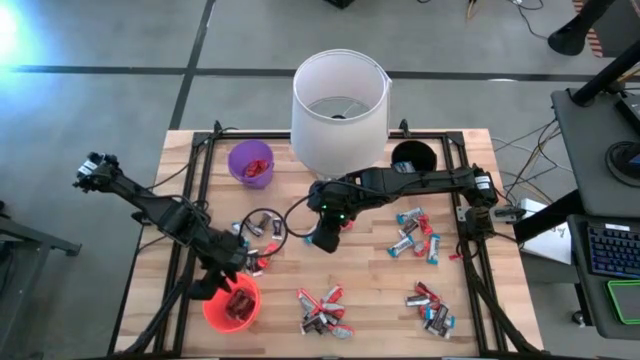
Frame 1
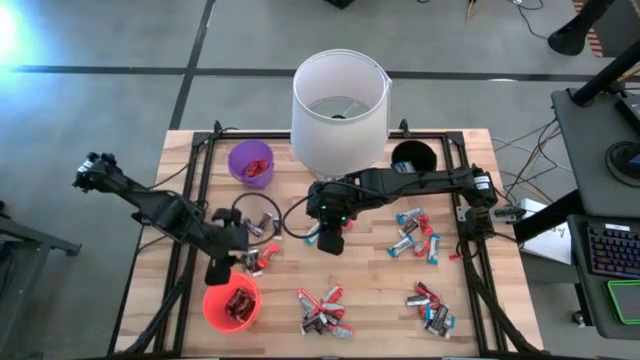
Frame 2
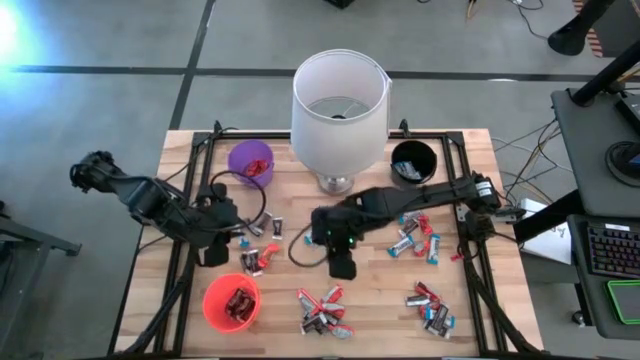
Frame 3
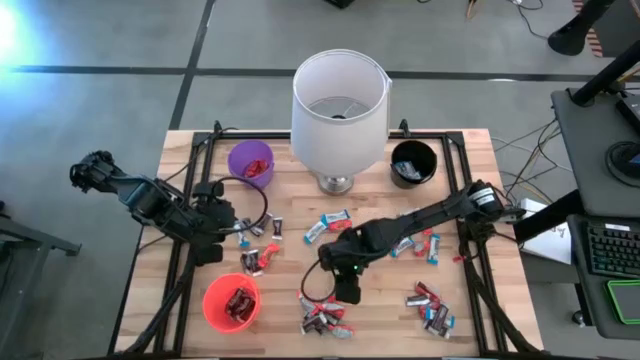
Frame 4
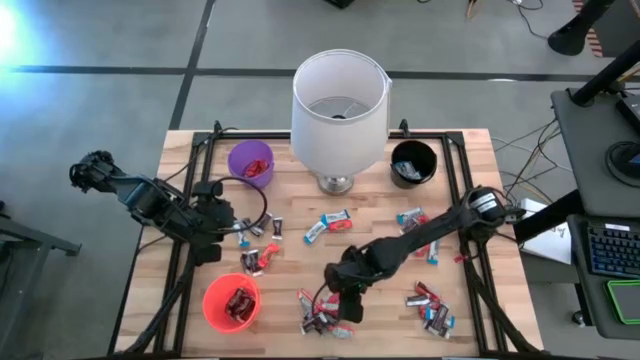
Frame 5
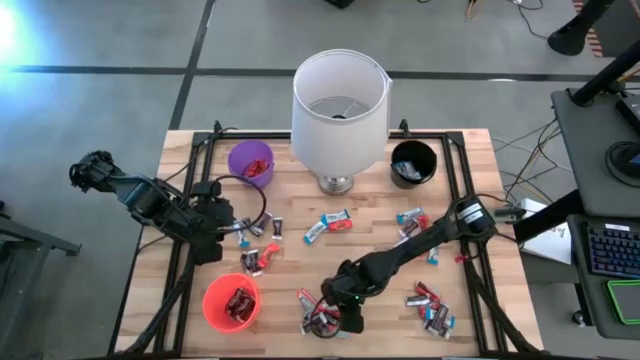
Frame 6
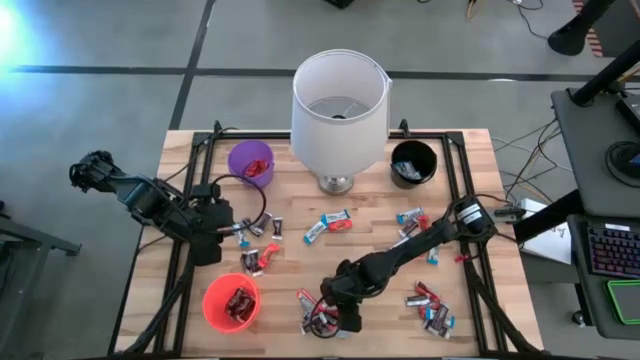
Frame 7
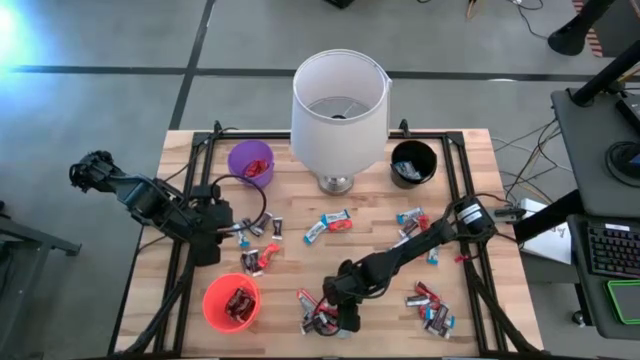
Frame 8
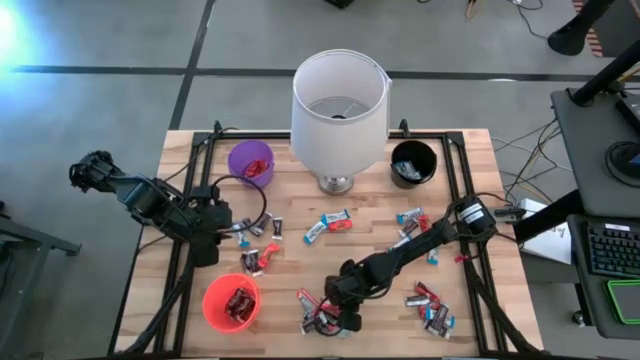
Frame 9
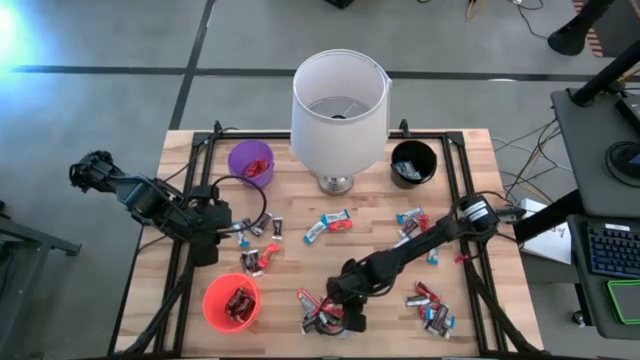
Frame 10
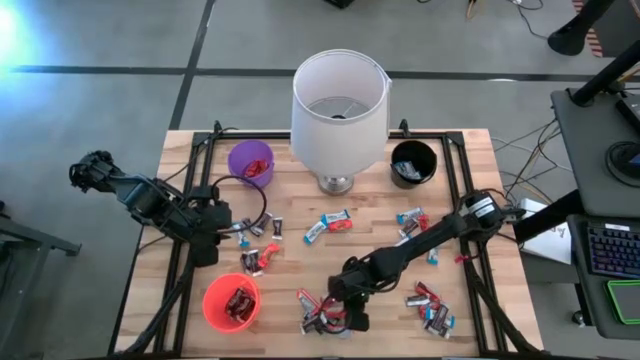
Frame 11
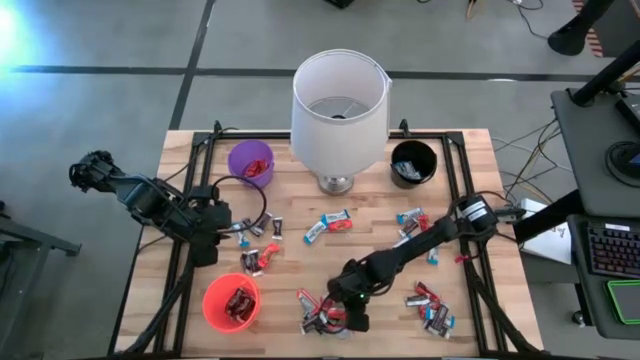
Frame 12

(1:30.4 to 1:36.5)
Task: Sort candy
Put the orange chocolate into the purple bucket

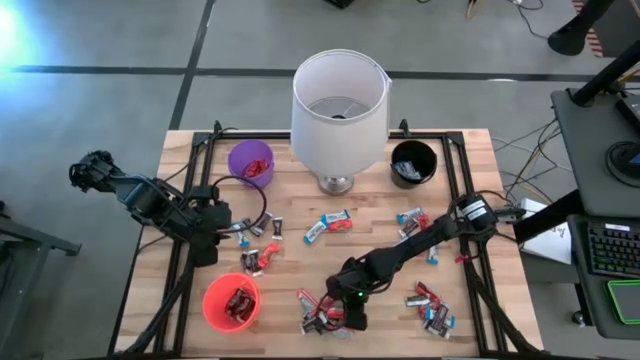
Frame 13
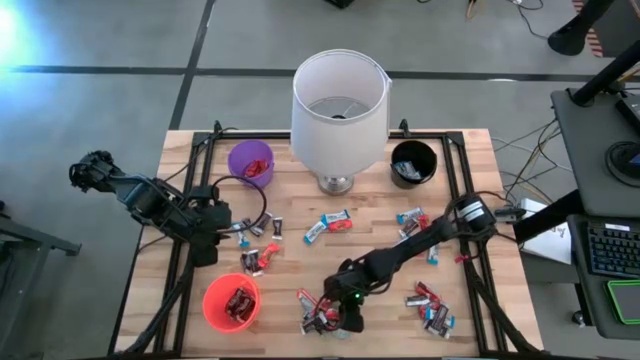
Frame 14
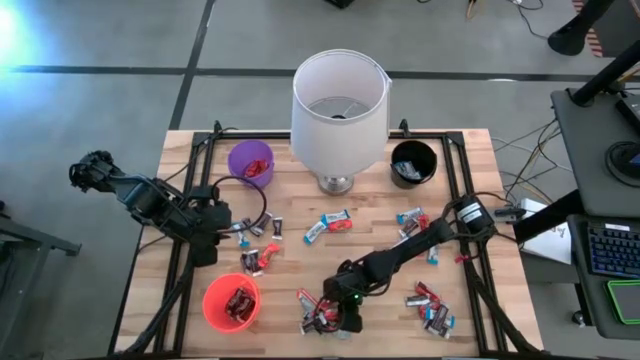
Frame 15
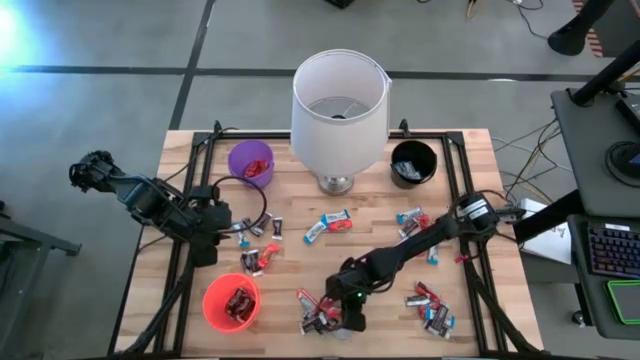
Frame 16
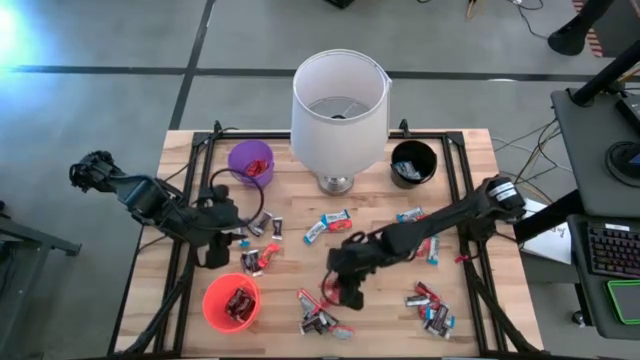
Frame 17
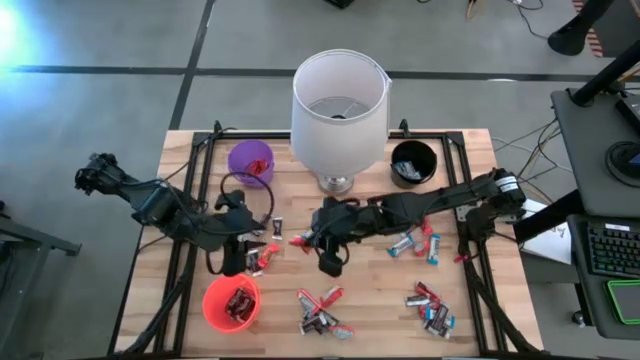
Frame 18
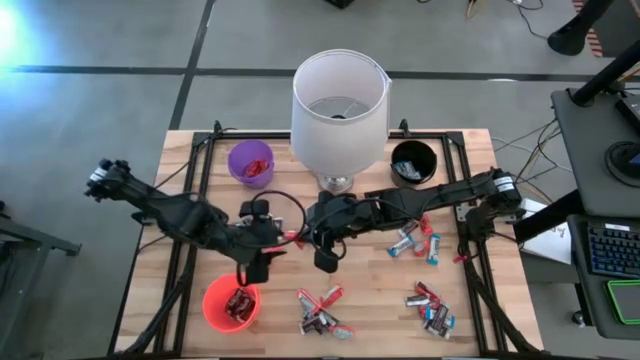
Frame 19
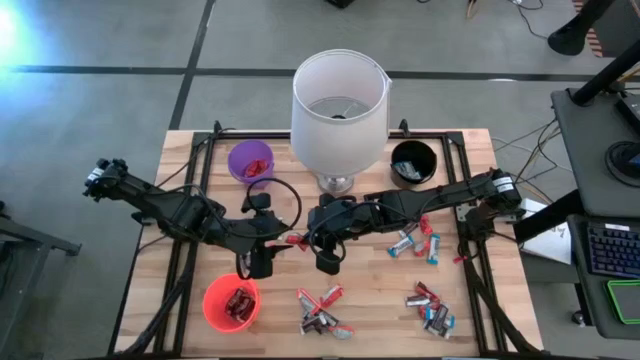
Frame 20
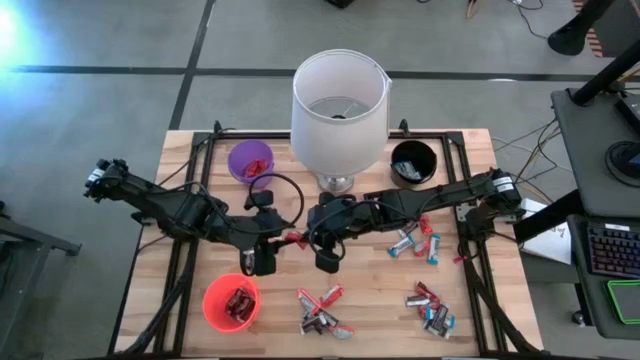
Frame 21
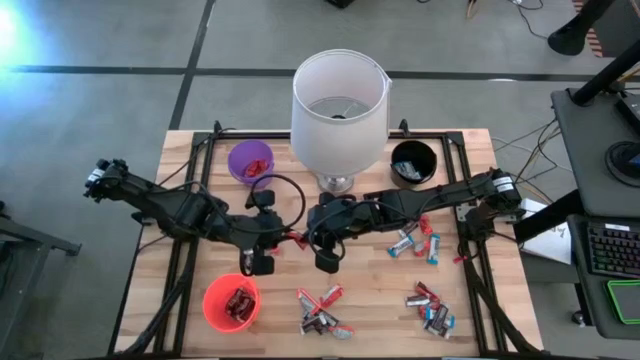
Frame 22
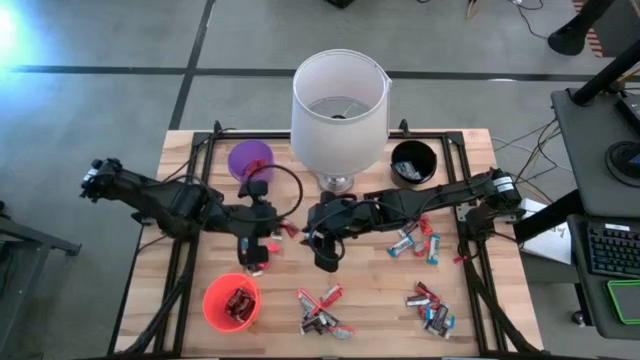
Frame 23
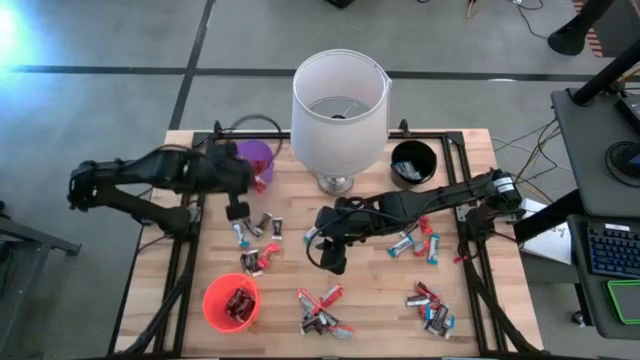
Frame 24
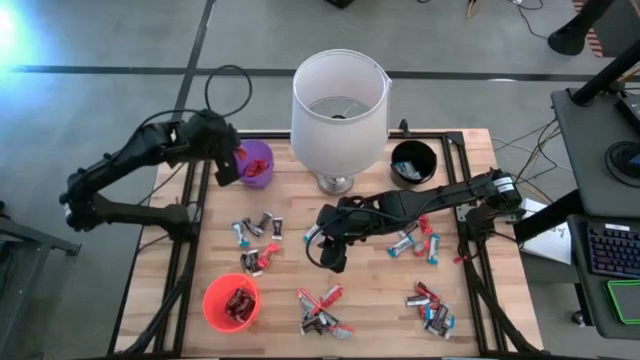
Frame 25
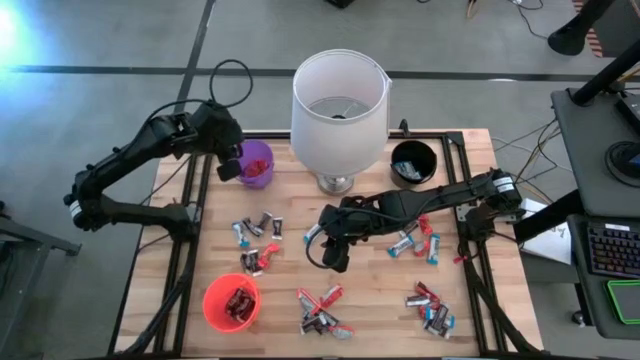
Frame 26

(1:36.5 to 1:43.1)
Put the orange chocolate into the purple bucket

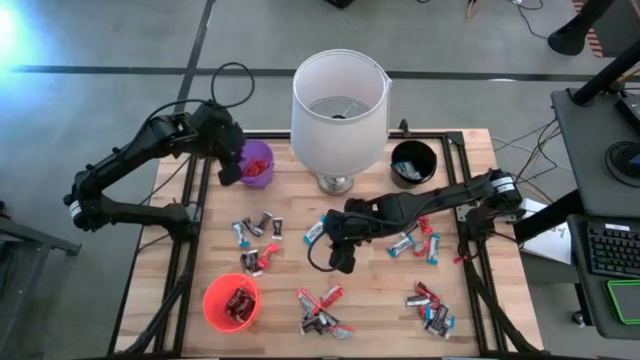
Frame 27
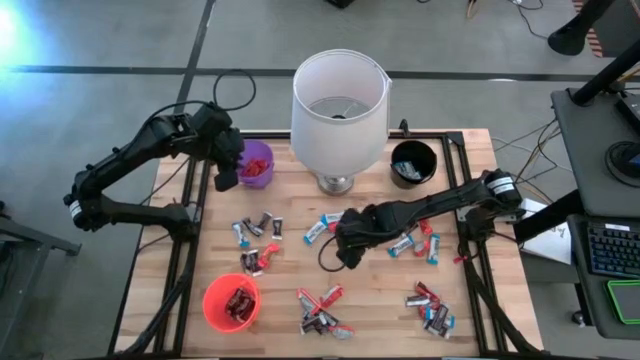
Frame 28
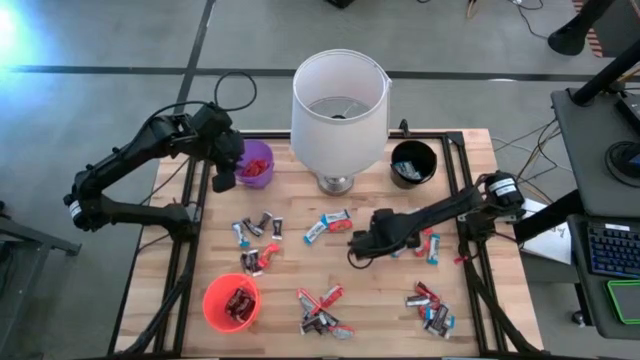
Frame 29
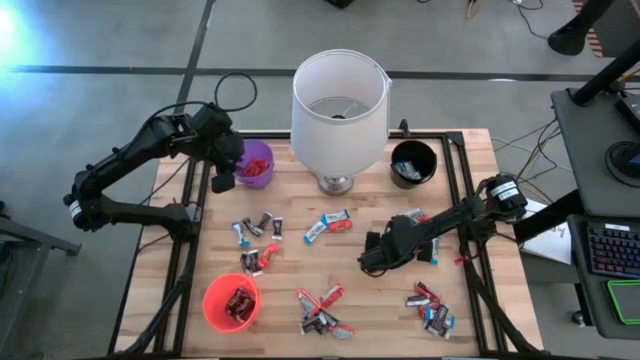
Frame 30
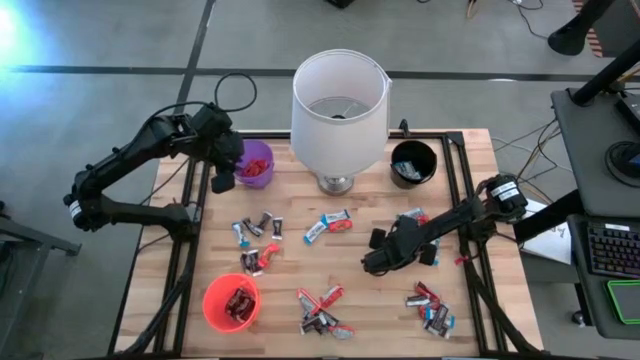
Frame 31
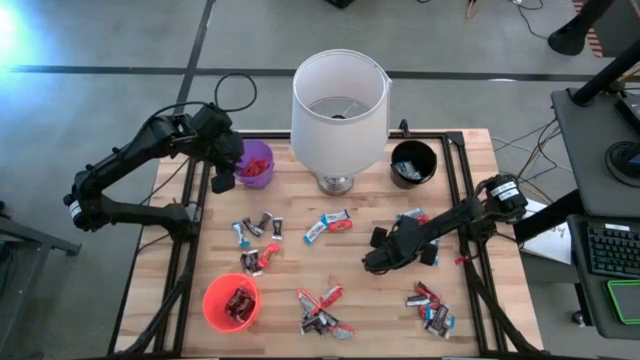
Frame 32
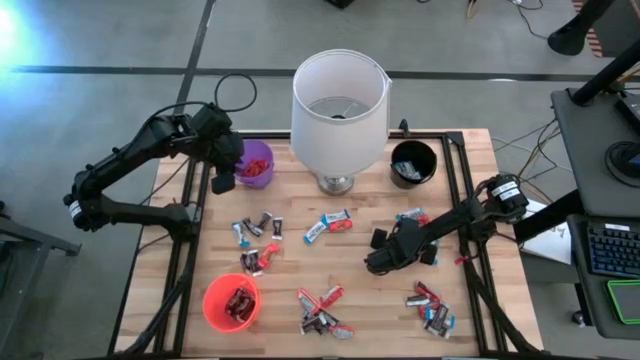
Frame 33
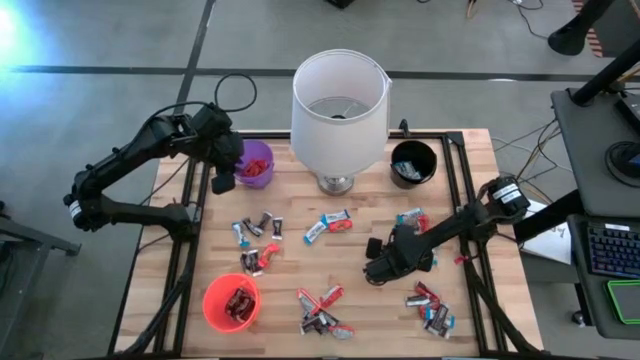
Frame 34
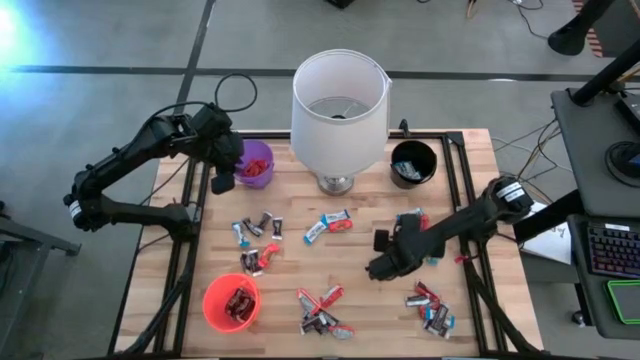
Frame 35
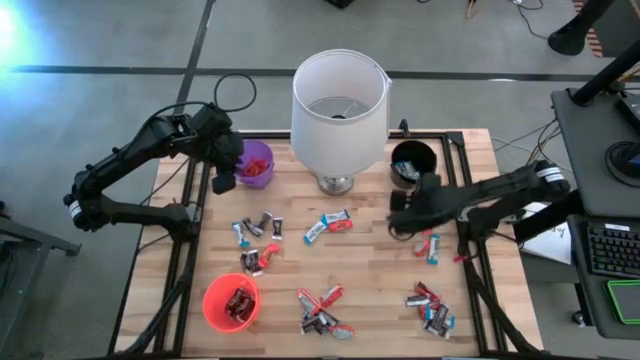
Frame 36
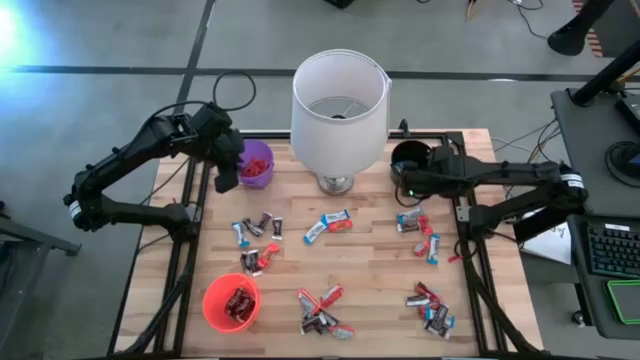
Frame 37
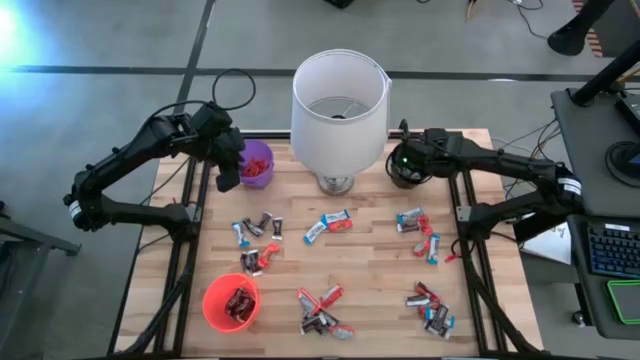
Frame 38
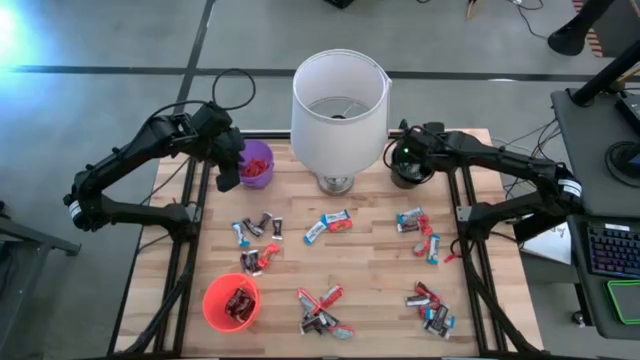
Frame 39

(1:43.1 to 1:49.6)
Put the white chocolate into the black bin

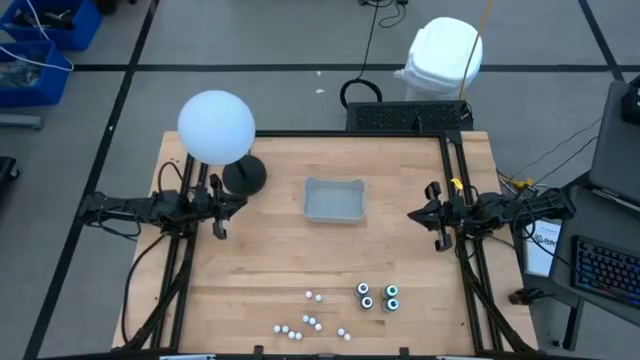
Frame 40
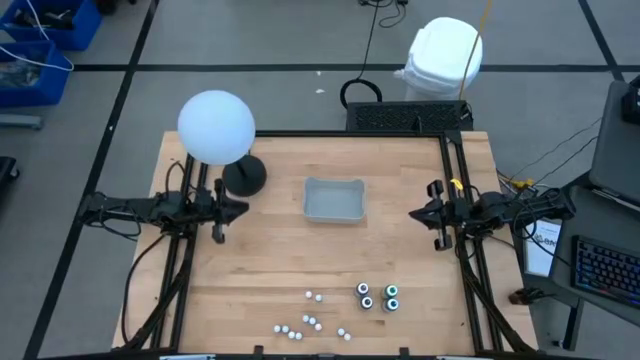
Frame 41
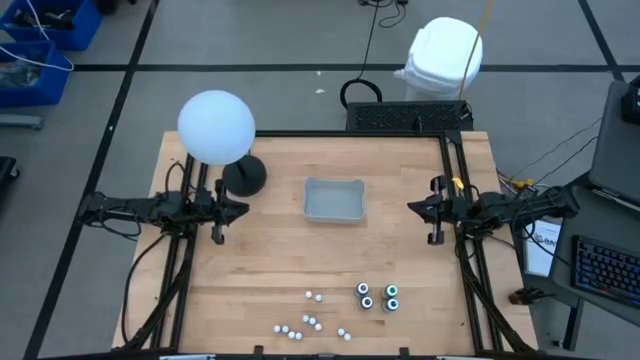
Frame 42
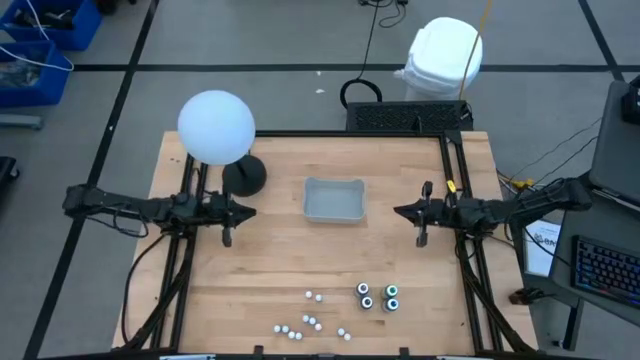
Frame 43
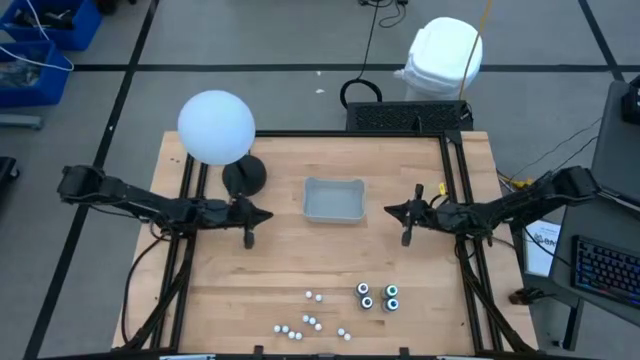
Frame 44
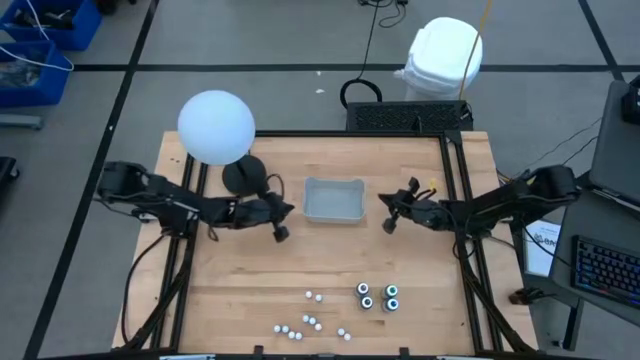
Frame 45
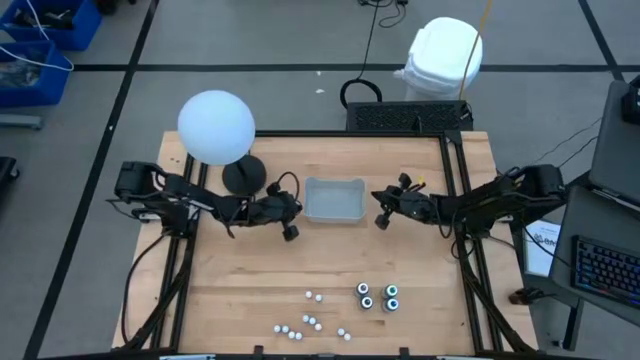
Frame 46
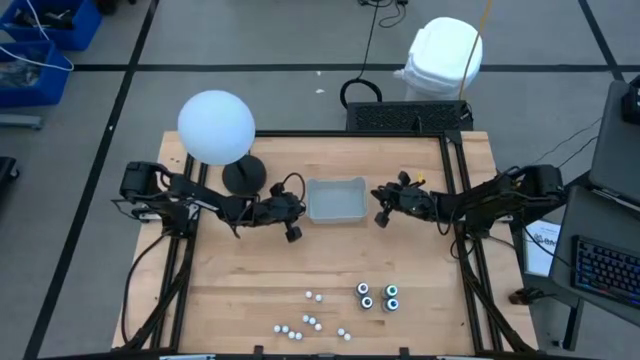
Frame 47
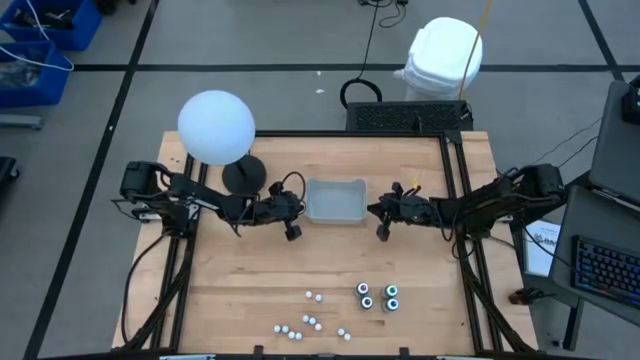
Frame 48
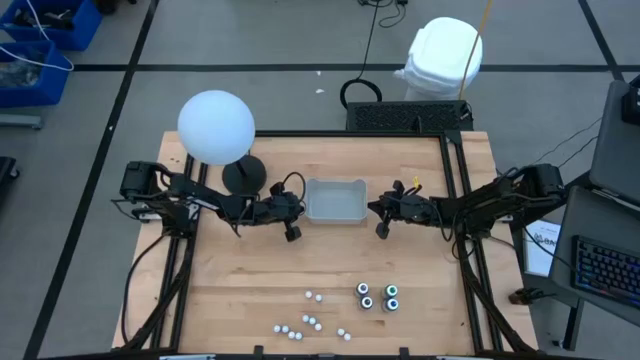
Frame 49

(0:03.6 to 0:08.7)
Task: Pick & Place food coloring
Prepare the gray bin on the table
